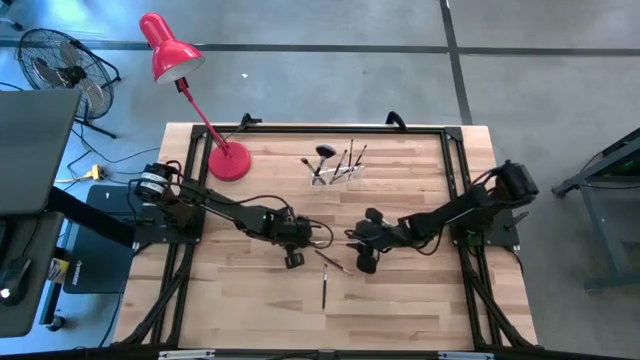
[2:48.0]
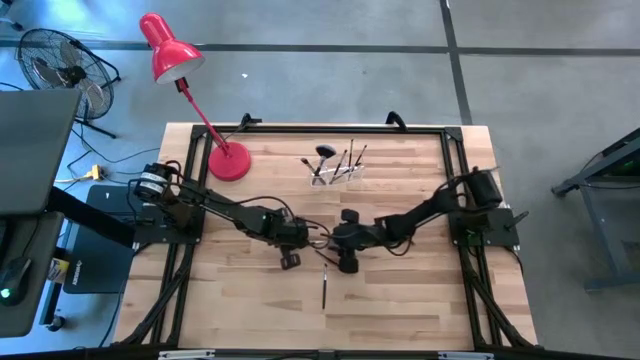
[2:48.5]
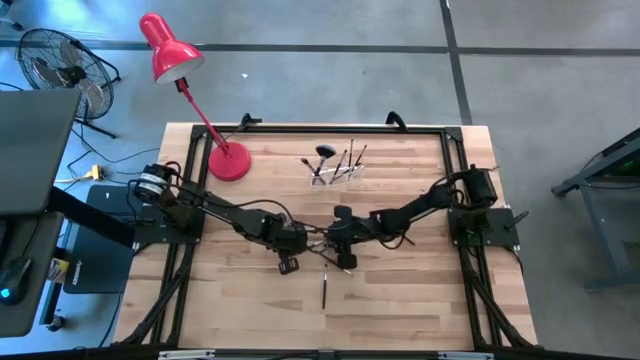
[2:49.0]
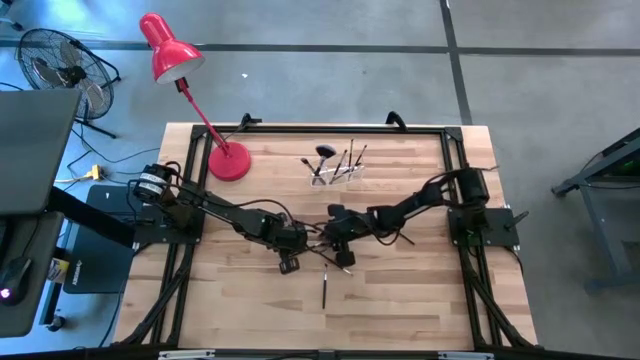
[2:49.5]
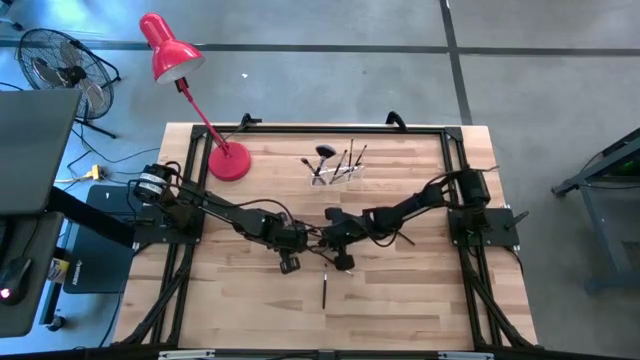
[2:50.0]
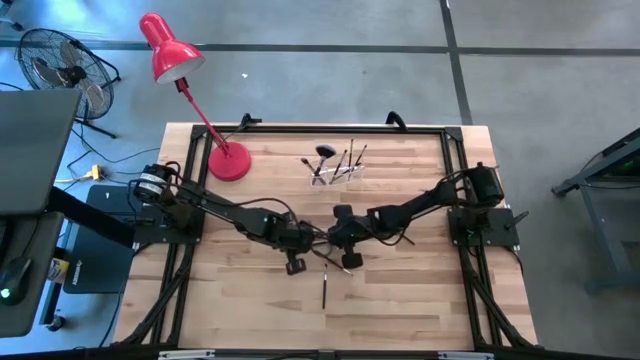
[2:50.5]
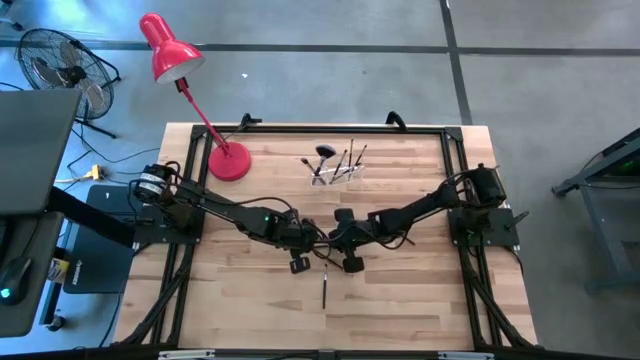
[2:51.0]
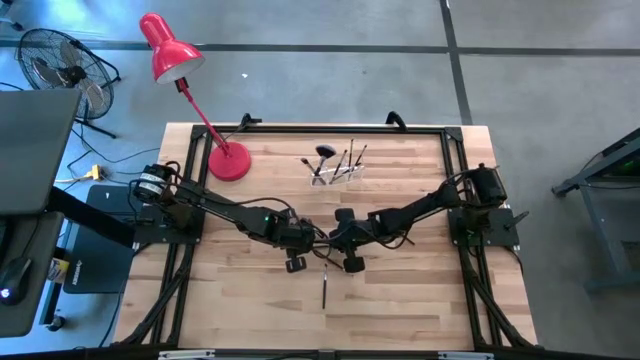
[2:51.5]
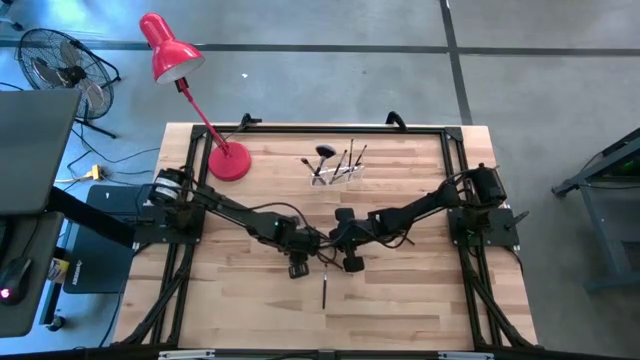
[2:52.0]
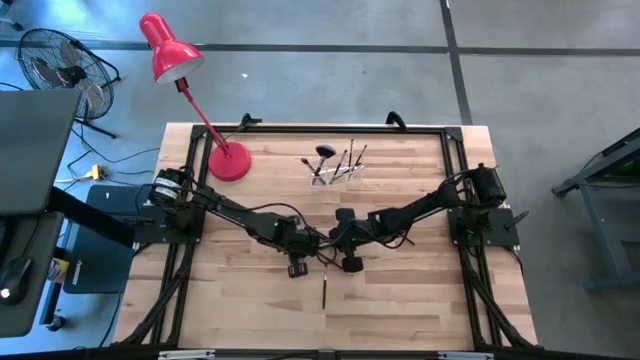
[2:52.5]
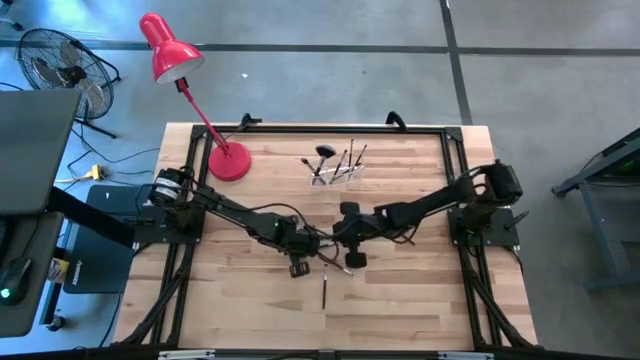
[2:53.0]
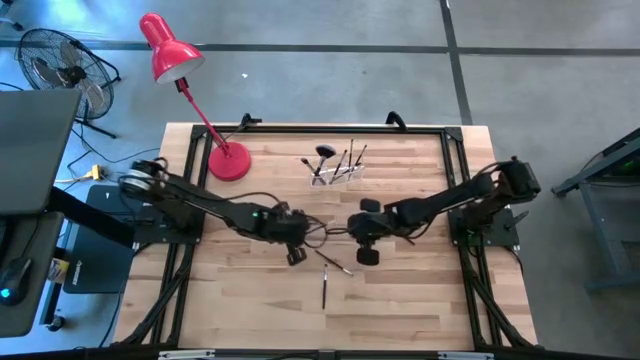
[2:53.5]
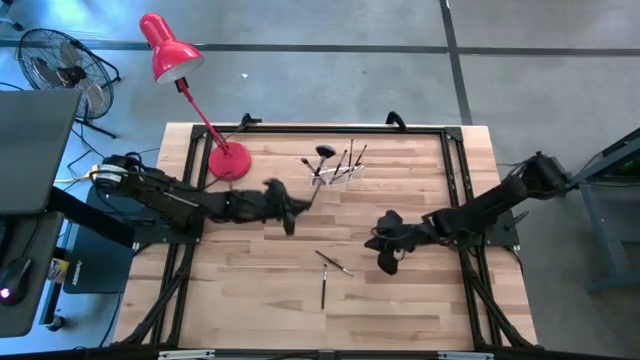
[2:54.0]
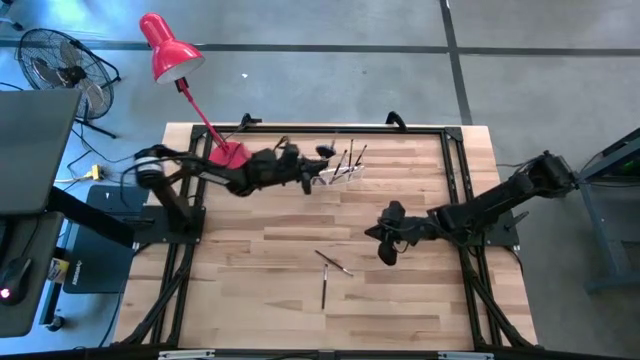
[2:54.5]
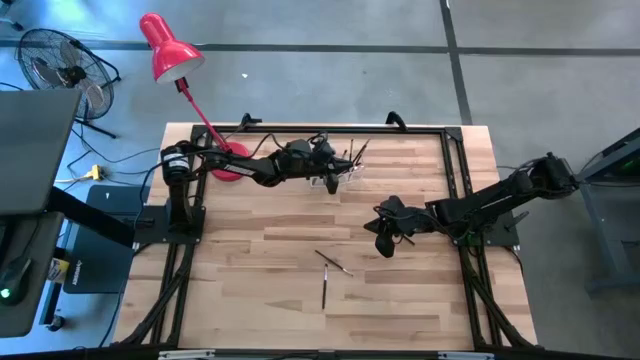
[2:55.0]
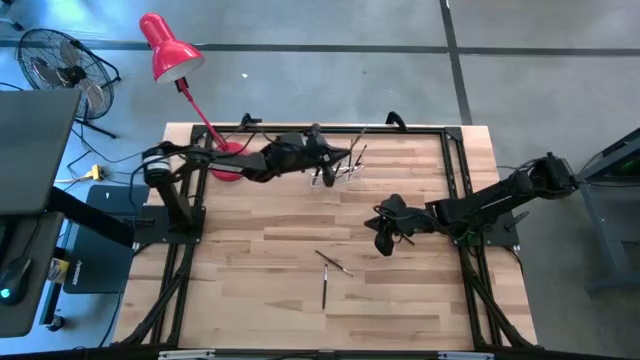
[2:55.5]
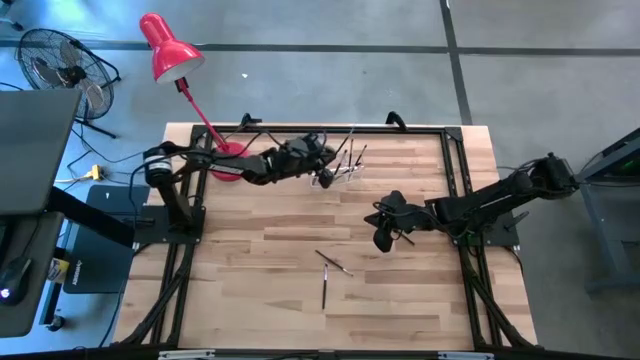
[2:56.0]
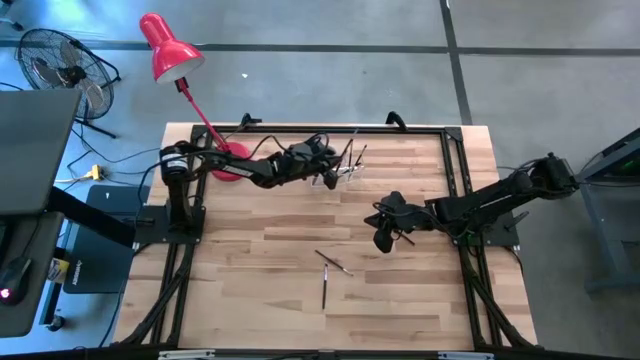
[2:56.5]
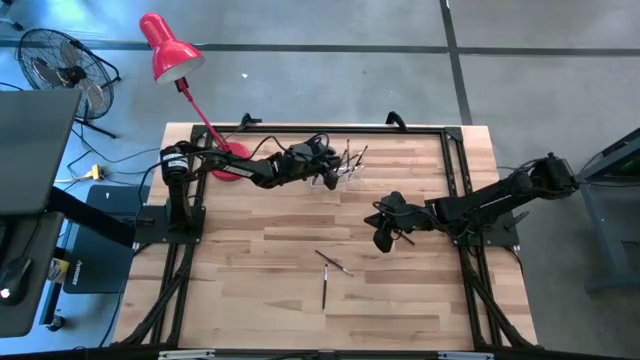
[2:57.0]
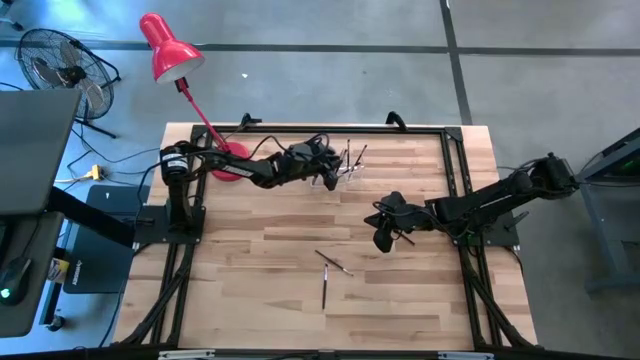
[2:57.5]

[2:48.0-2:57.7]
Task: Put items in baskets/containers
Put the liner brush into the transparent organizer

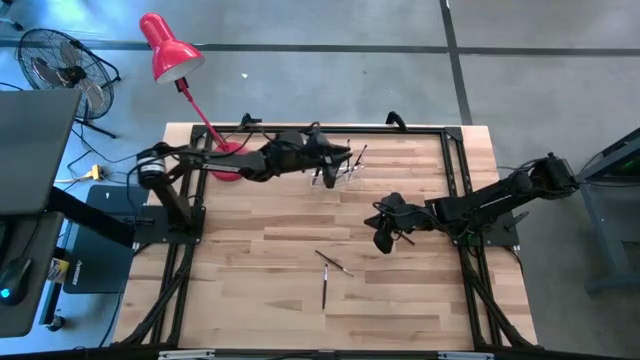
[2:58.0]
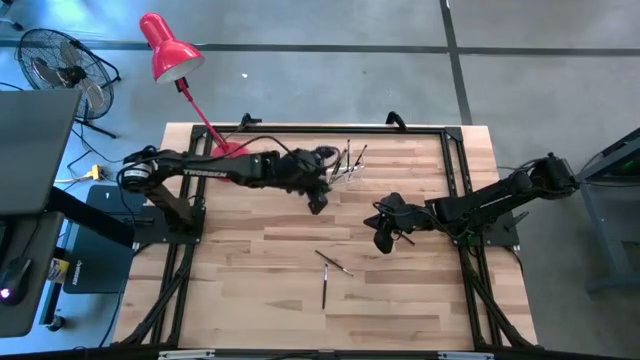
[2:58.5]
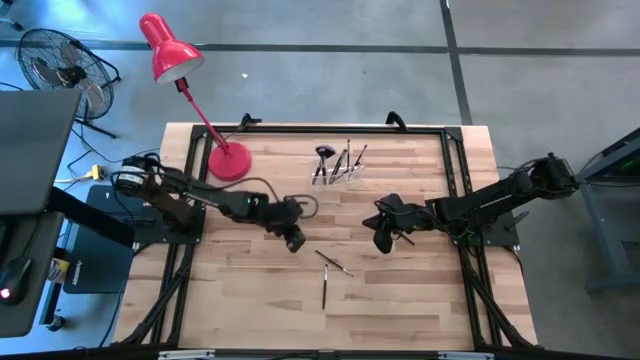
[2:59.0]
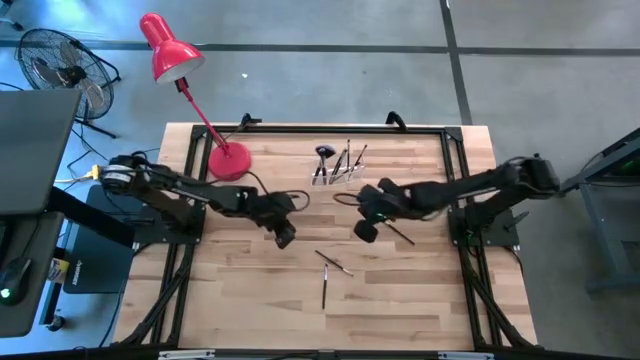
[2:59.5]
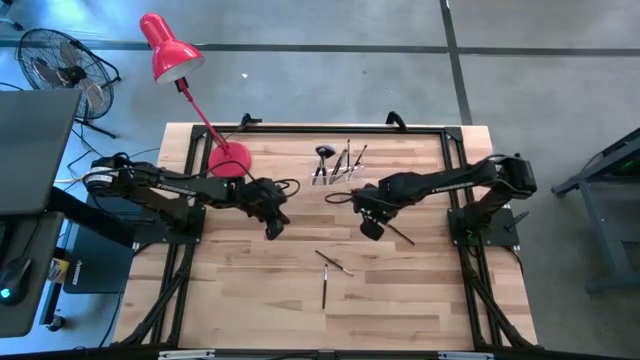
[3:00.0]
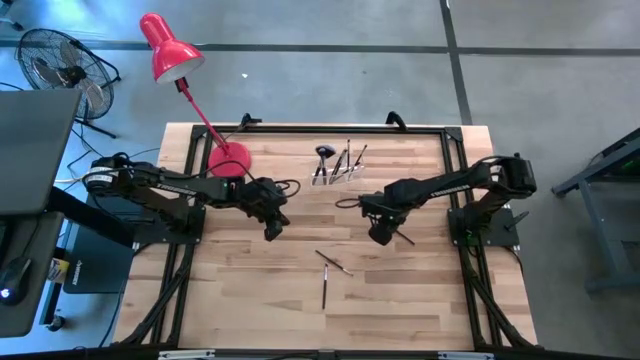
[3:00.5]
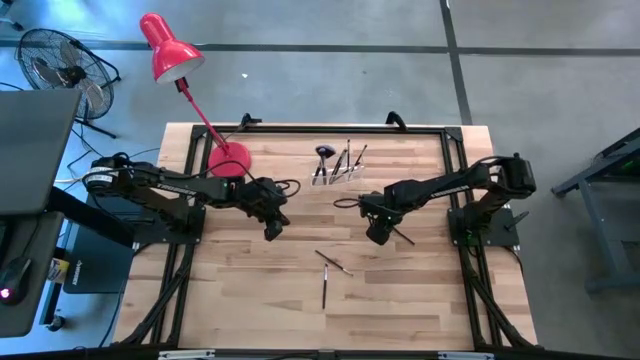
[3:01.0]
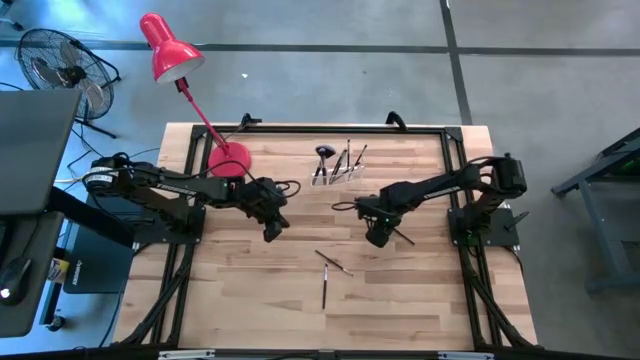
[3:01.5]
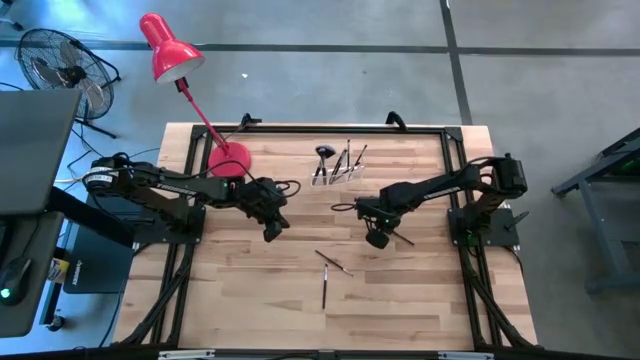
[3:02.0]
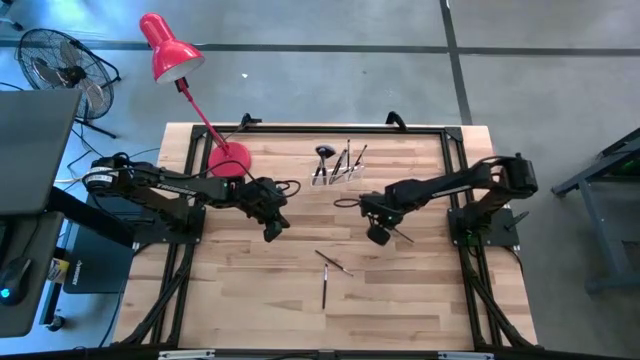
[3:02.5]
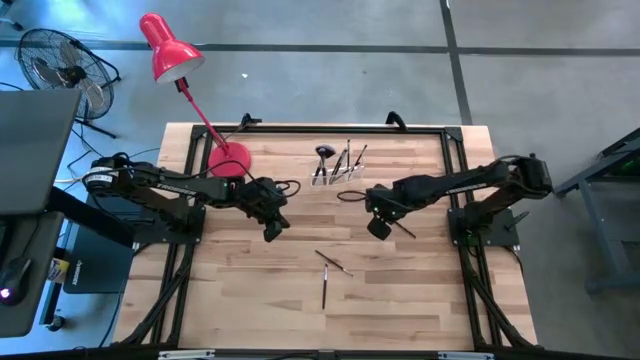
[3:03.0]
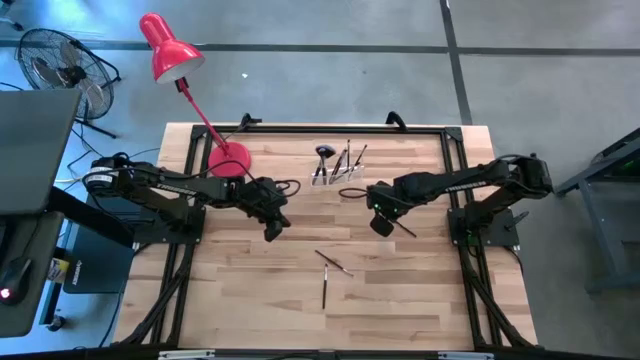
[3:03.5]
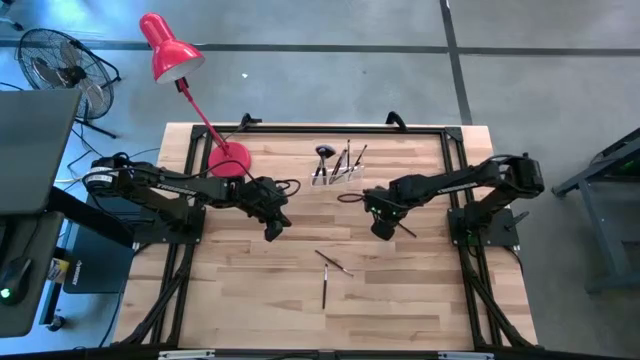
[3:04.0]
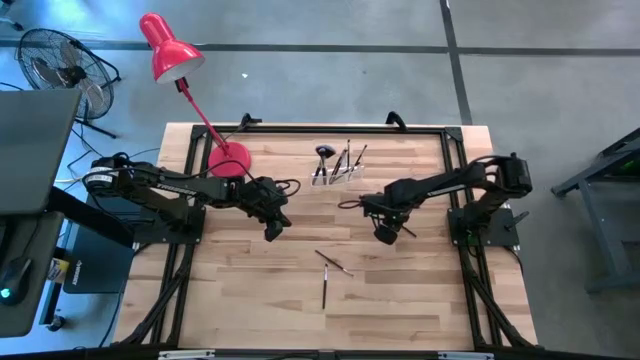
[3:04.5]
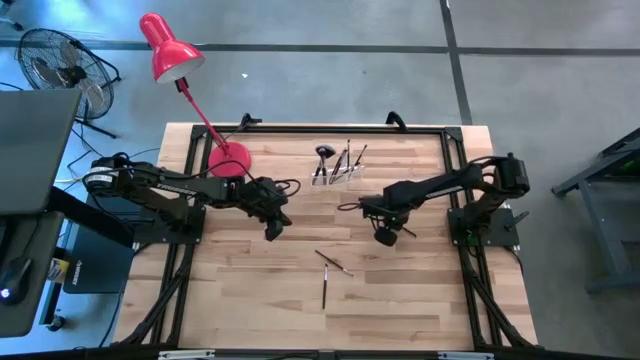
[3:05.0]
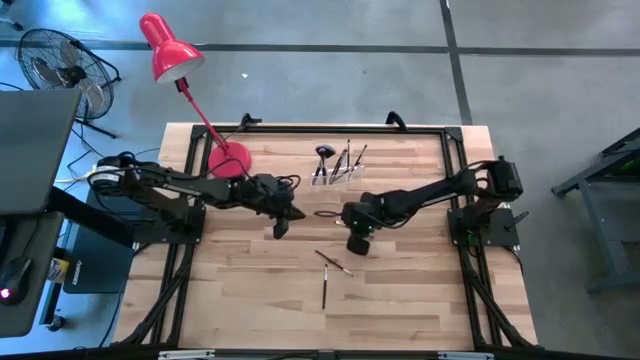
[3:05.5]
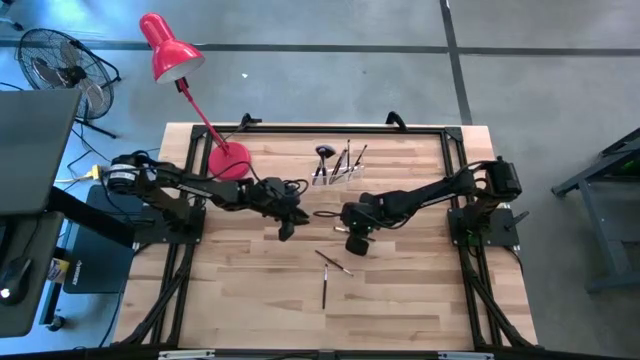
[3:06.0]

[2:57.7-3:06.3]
Put the eyeshadow brush into the transparent organizer

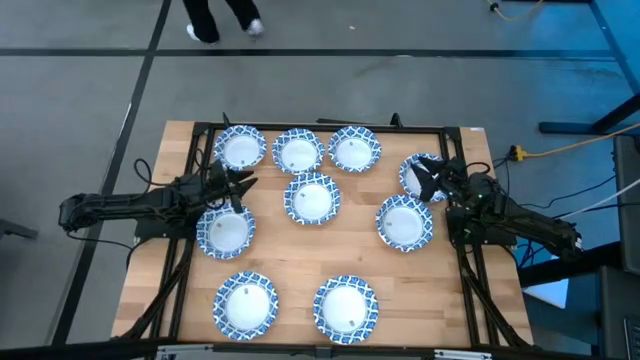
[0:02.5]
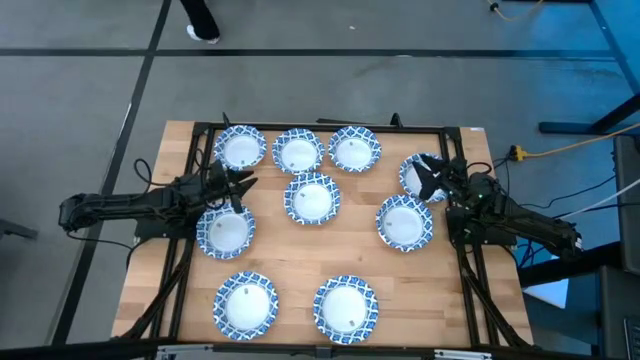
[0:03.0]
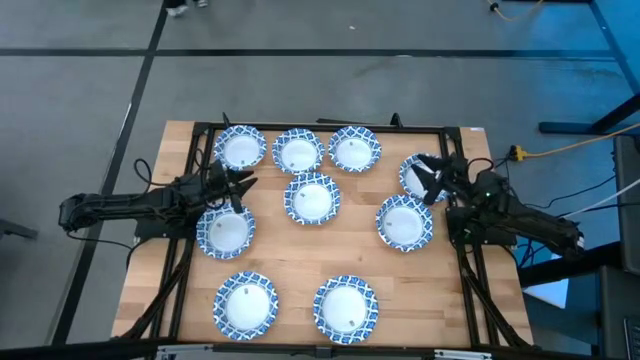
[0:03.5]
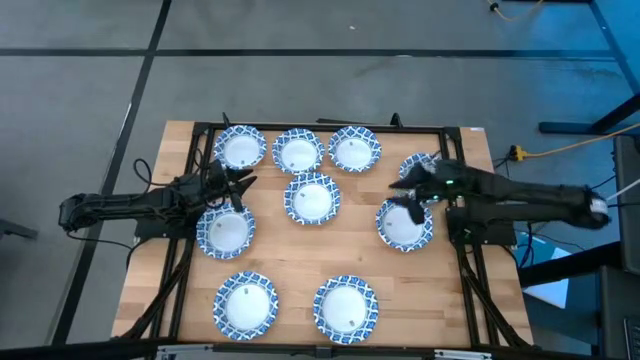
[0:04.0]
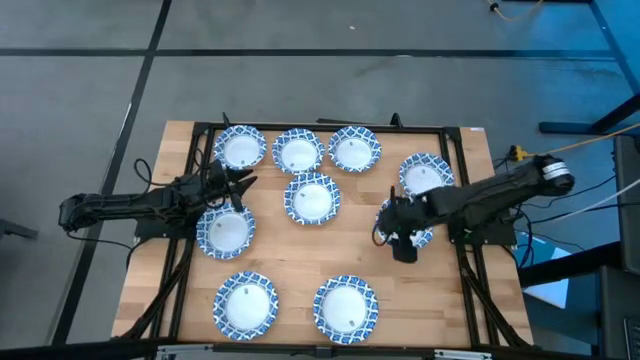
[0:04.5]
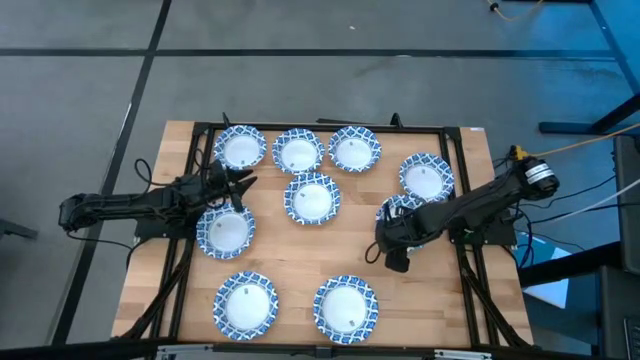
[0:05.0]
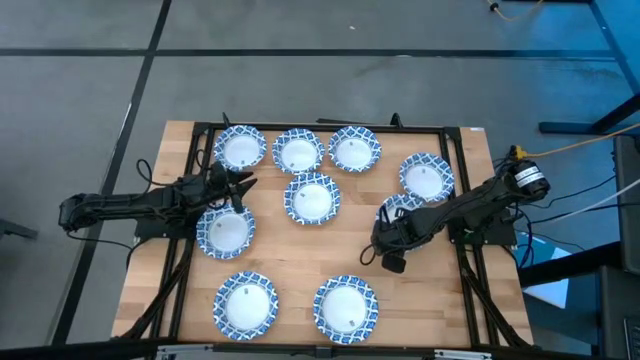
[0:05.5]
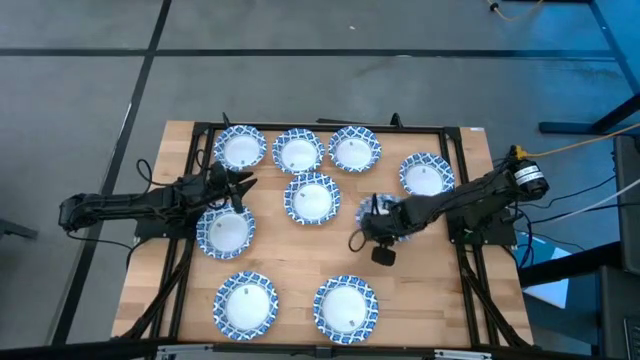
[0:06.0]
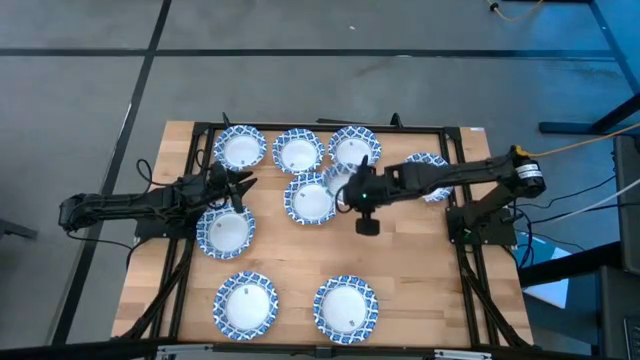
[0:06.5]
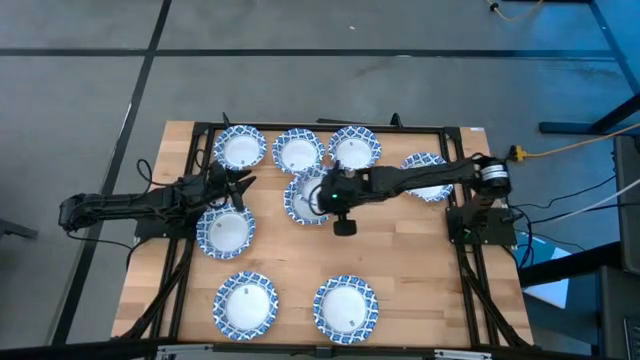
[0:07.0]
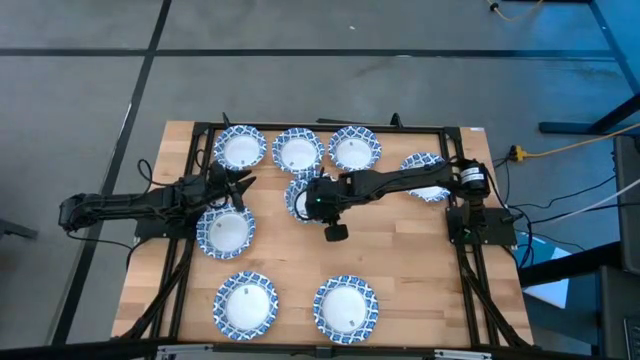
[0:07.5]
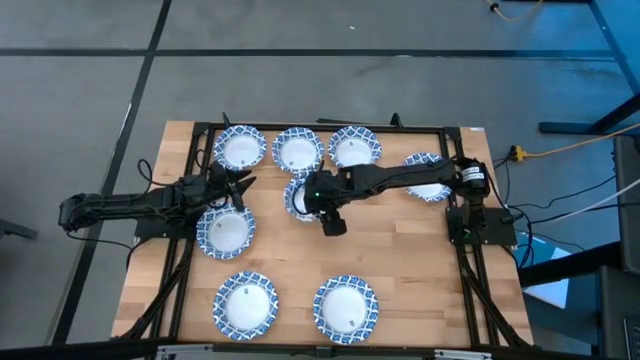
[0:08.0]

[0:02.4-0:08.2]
Task: Nest bowls inside each other
Stack the white bowl on top of the white bowl
